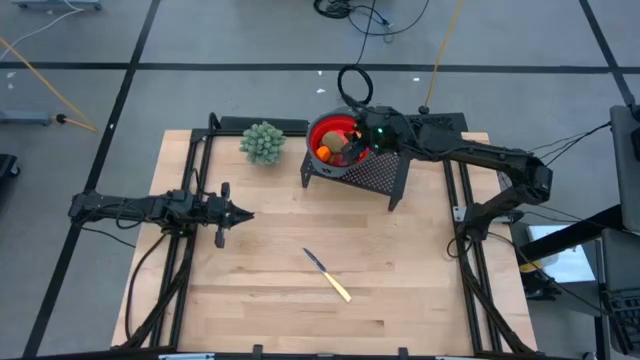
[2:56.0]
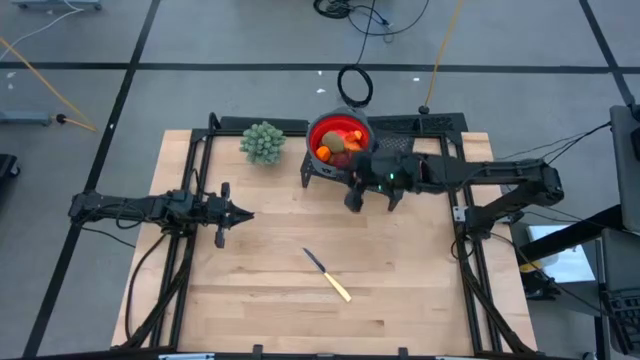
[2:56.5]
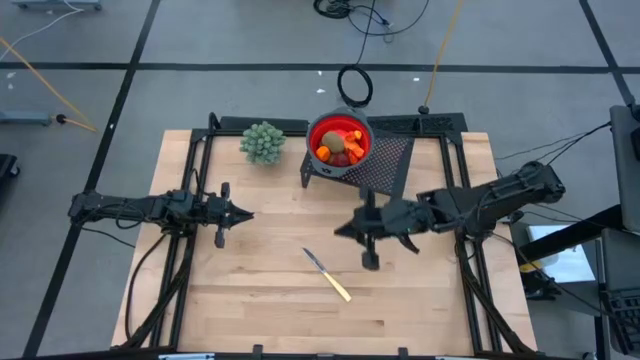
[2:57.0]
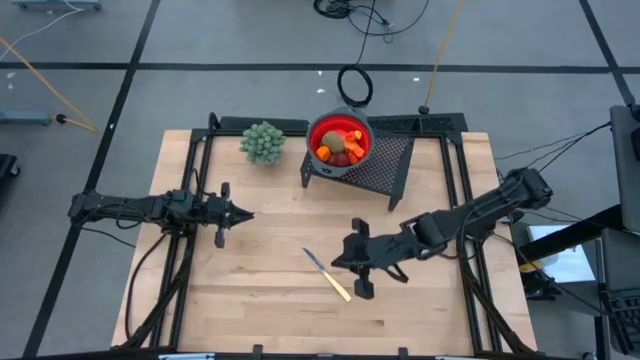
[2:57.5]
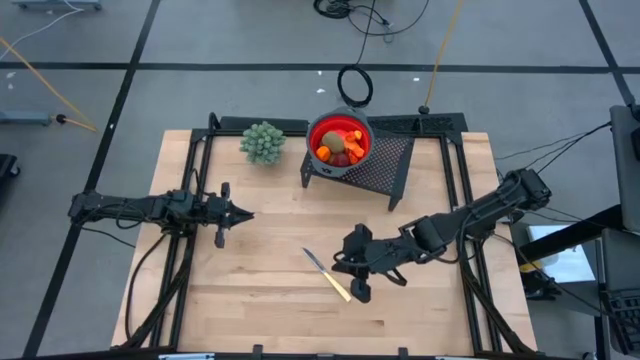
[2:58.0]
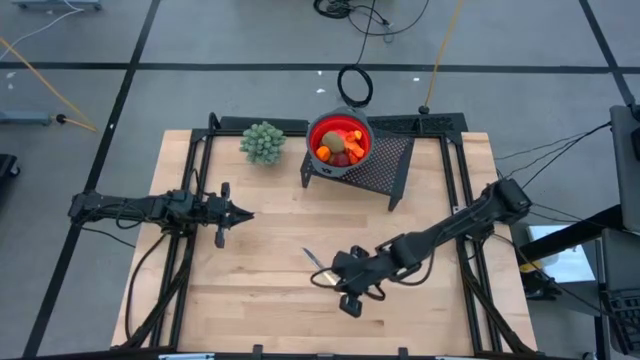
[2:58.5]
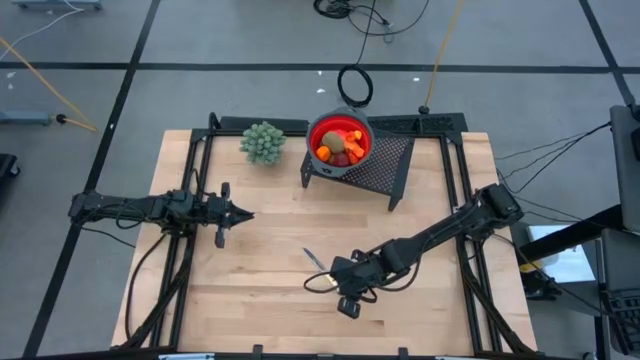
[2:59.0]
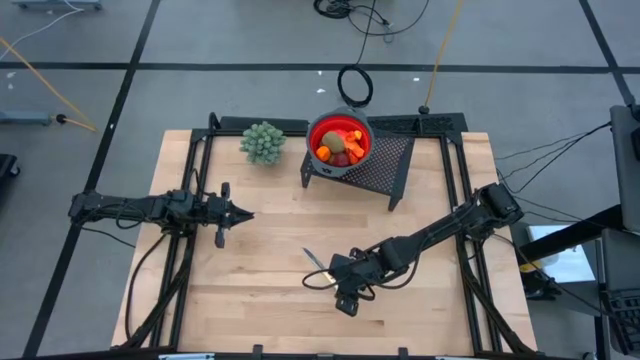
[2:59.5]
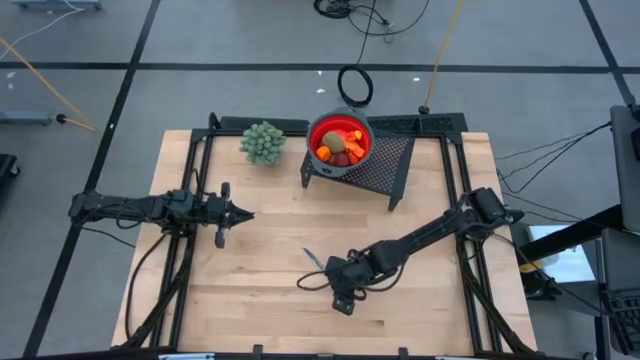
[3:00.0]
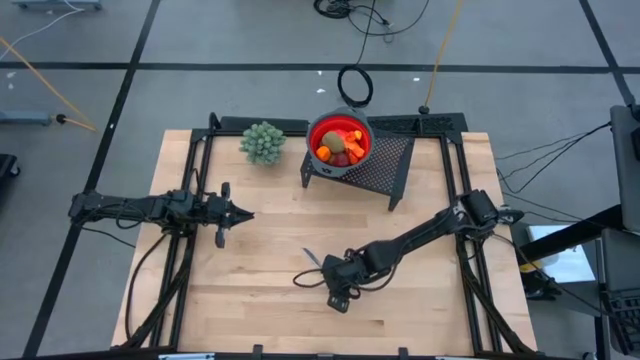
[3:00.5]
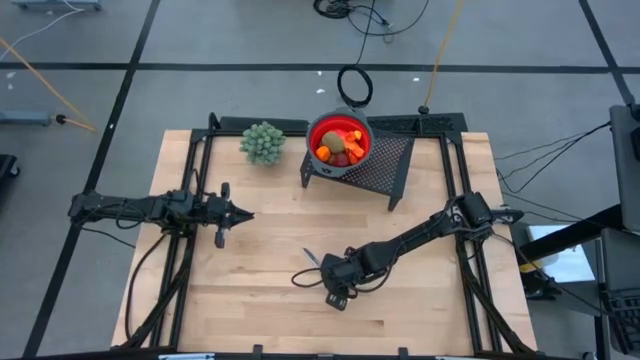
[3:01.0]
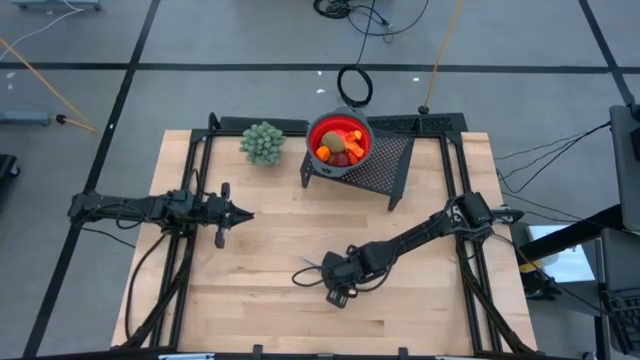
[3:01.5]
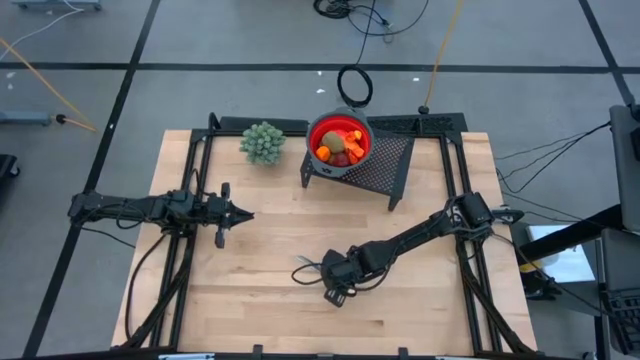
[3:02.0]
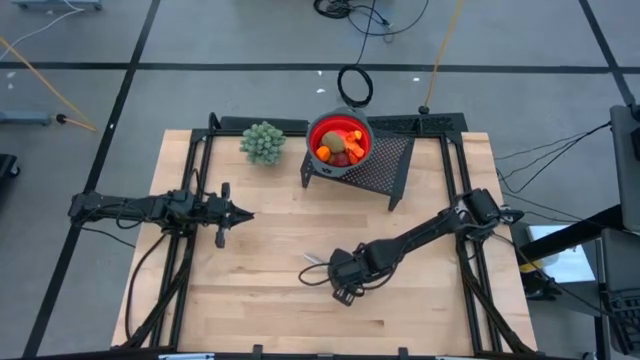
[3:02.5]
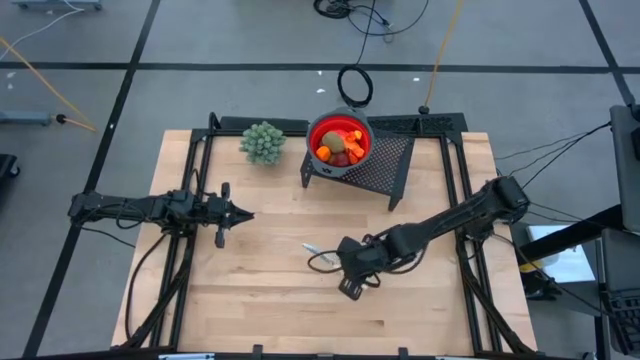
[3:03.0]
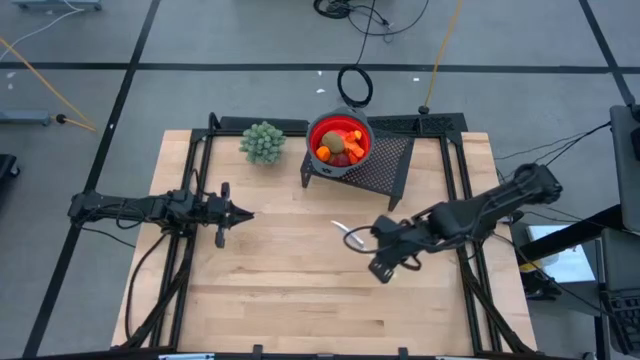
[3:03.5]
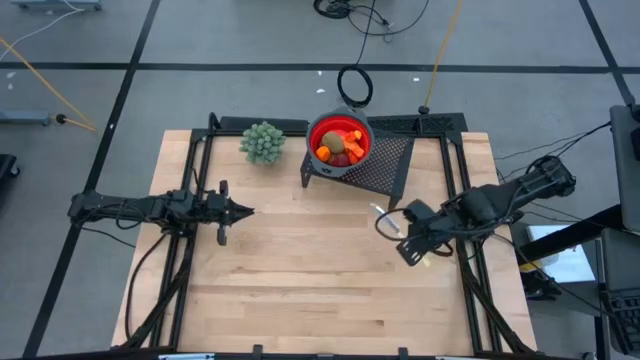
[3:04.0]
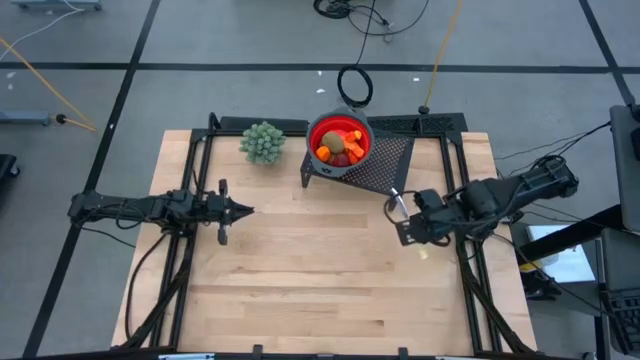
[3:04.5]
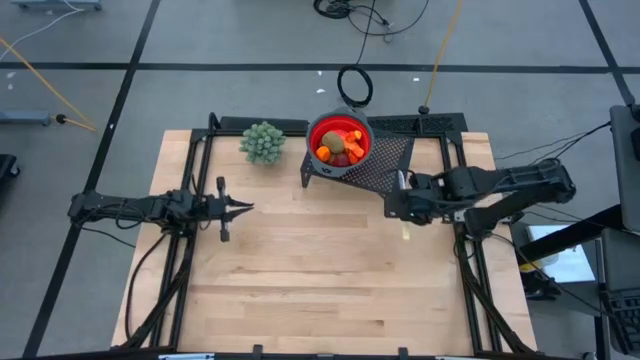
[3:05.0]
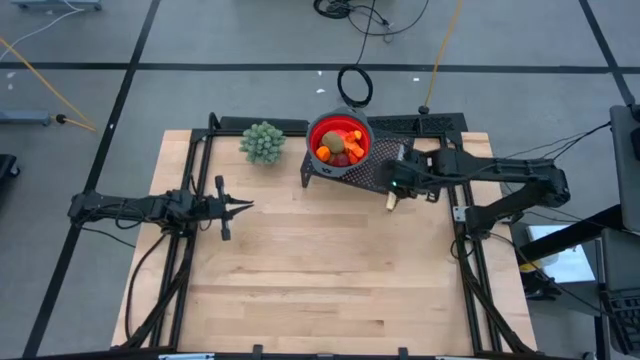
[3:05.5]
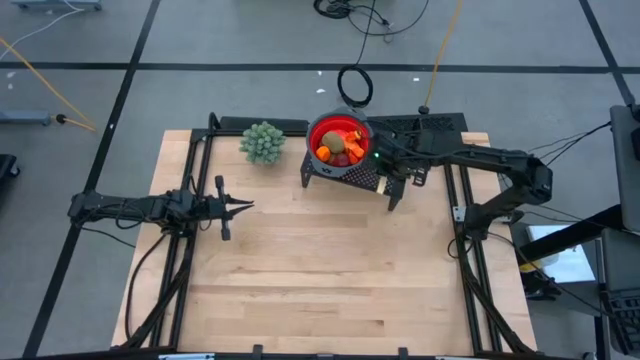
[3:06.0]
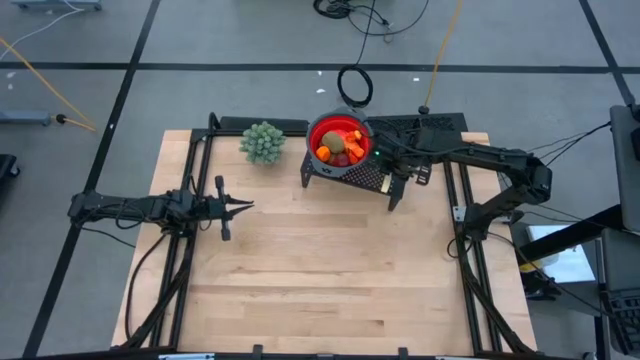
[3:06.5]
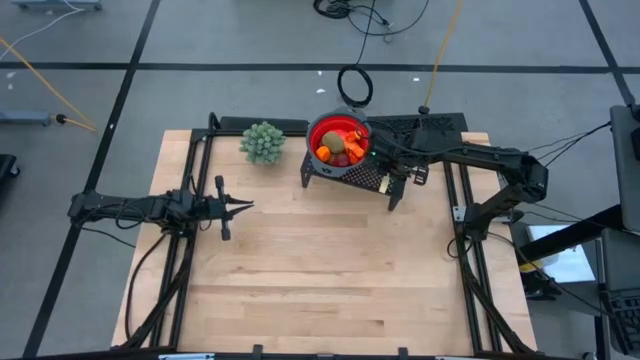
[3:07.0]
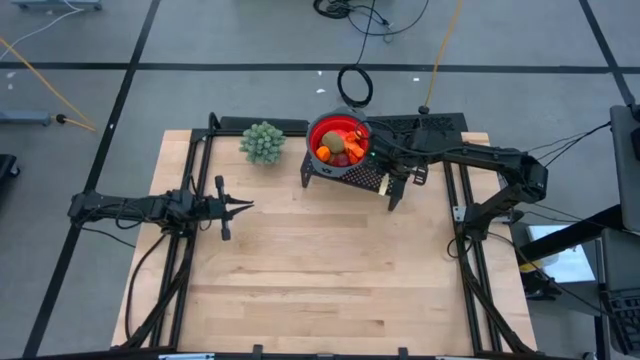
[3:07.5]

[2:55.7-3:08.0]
Task: Pick & Place Fruit
Put the yellow knife on the shelf

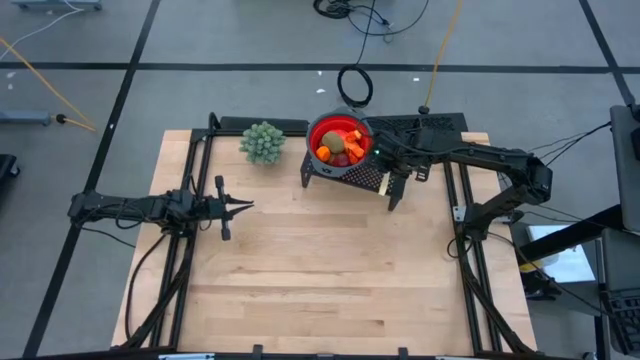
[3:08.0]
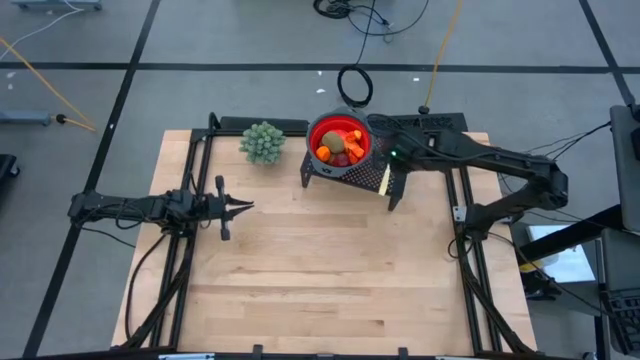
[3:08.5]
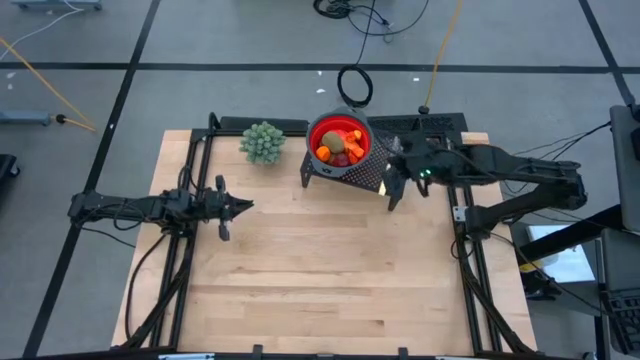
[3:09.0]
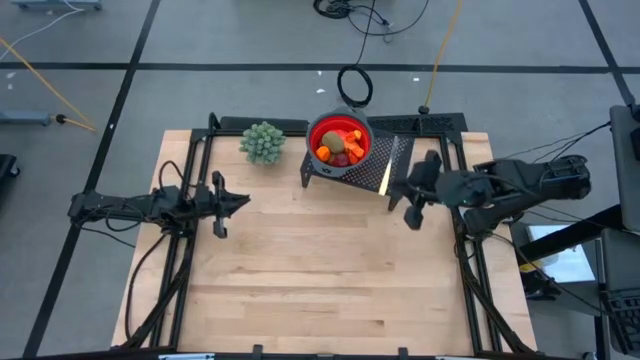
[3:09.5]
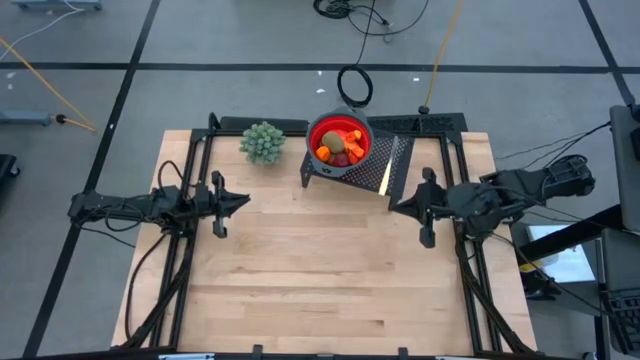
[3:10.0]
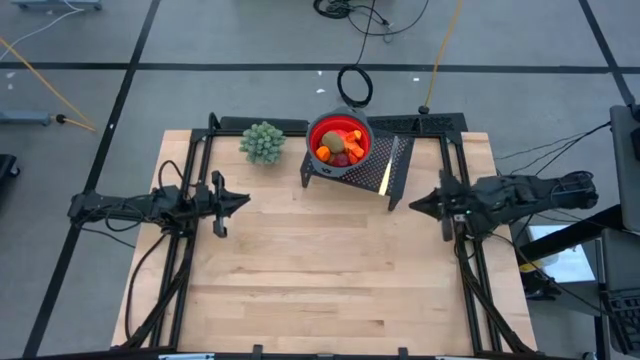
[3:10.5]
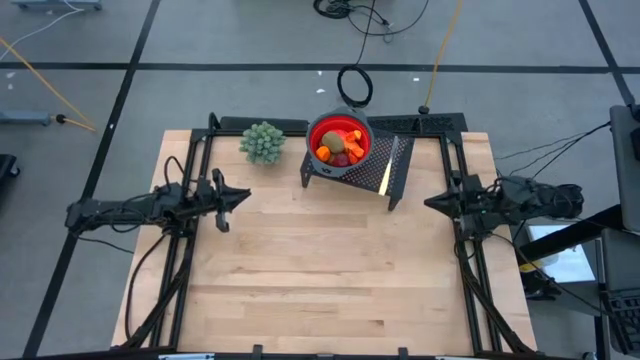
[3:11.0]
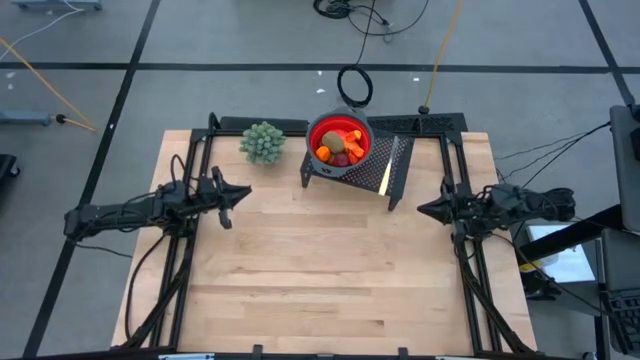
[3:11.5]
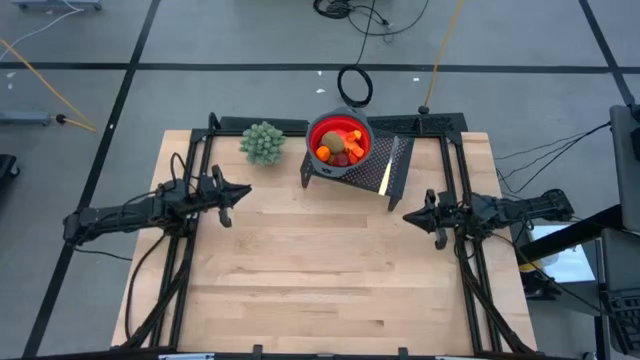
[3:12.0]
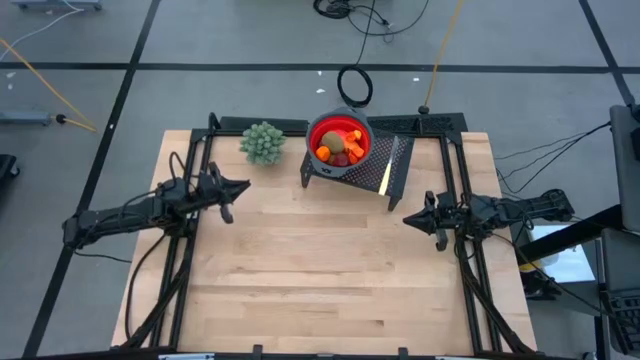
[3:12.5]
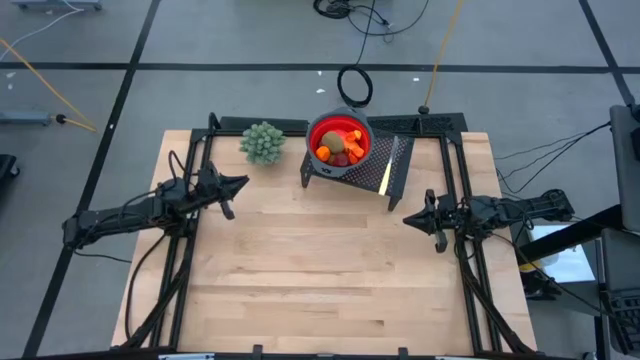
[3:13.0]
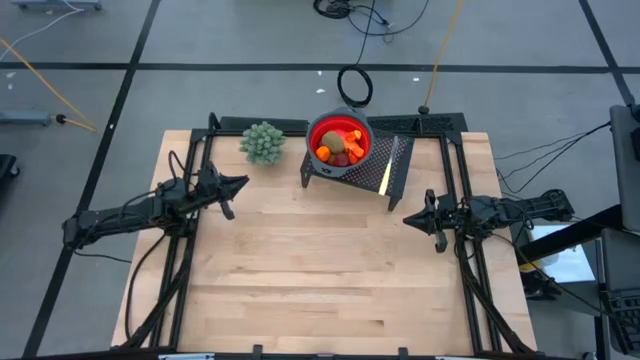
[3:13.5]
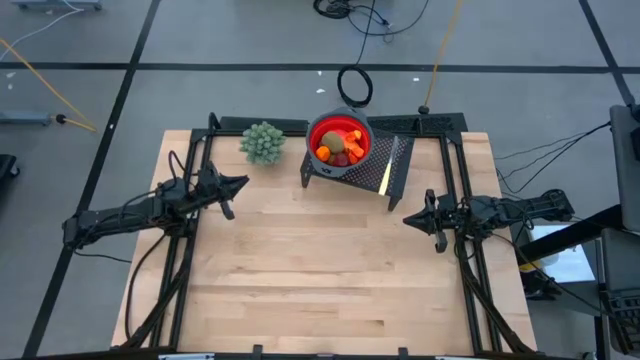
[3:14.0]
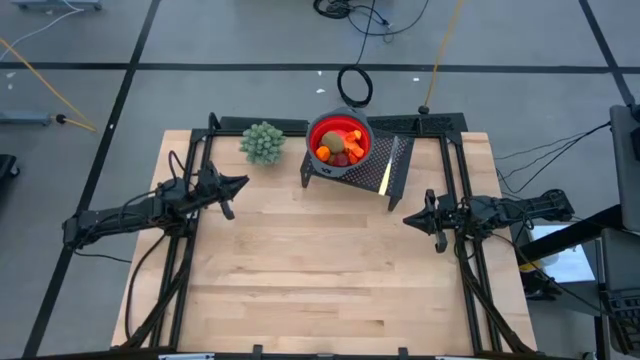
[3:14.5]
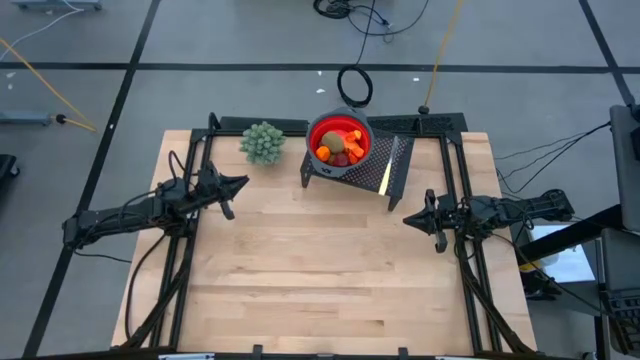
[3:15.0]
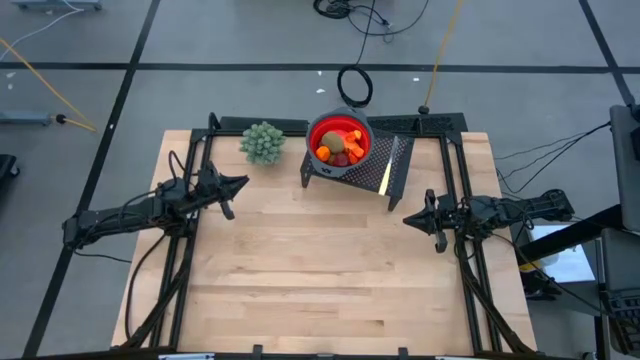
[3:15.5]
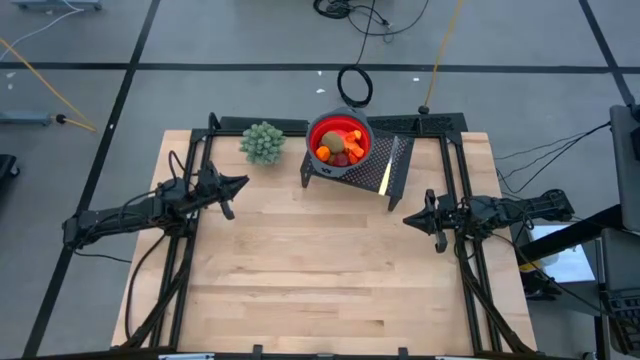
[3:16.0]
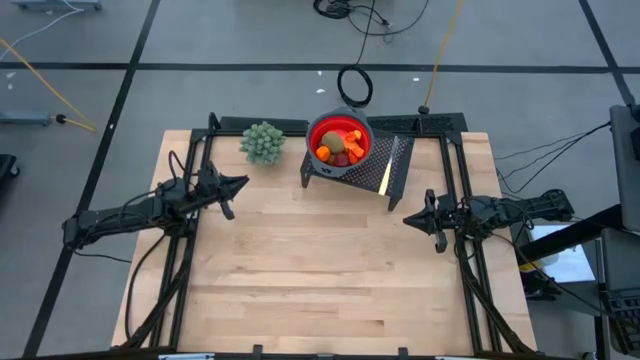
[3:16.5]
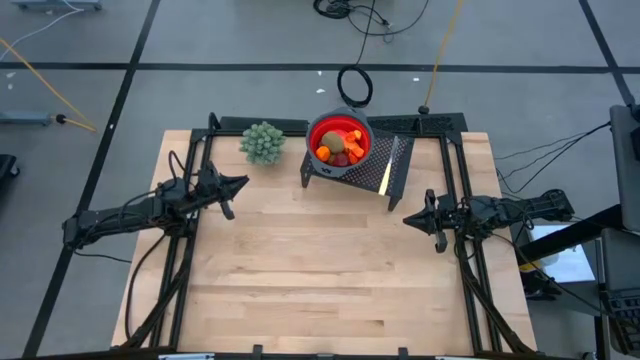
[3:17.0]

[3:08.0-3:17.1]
Return to Home Position

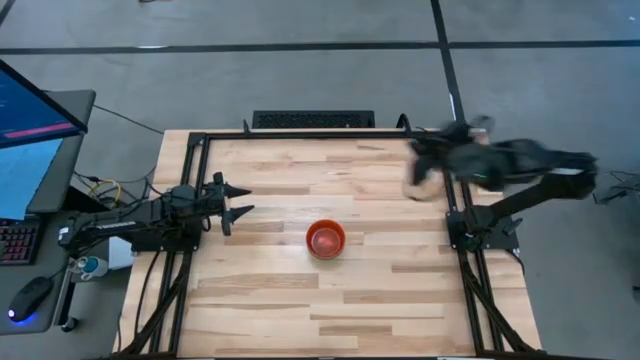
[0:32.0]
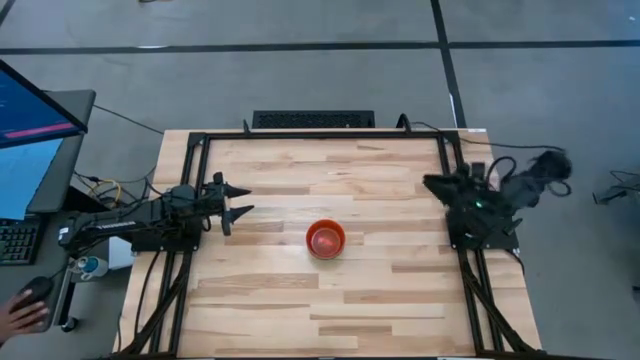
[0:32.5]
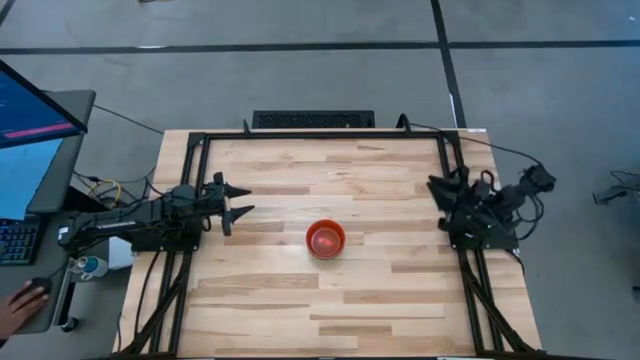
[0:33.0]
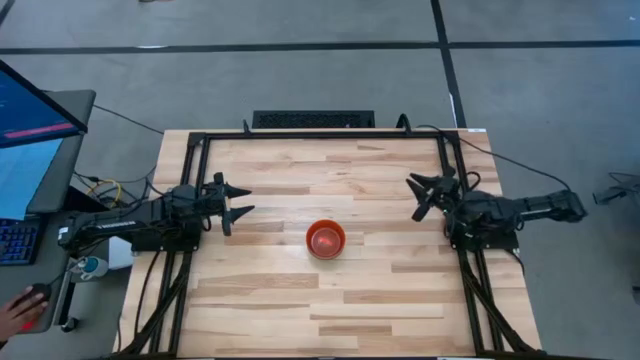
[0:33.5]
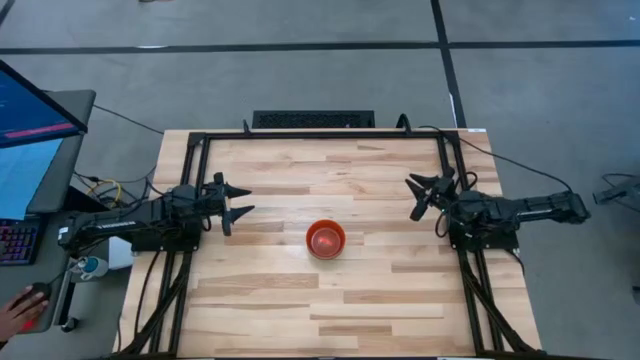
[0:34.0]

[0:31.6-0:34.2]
Task: Nest bowls inside each other
Return to Home Position
